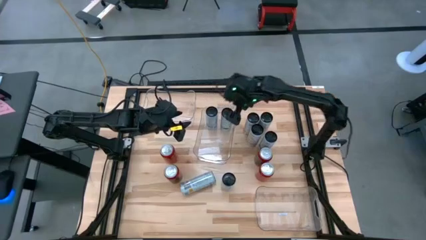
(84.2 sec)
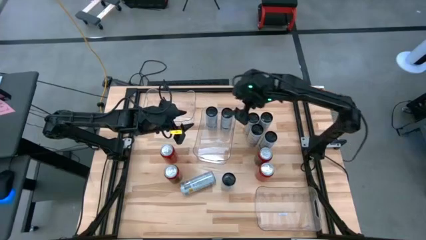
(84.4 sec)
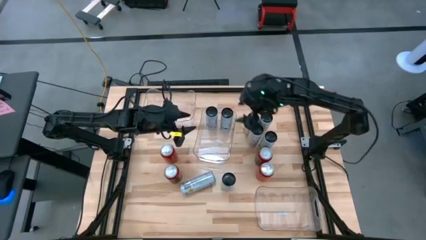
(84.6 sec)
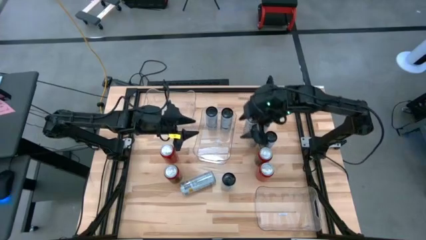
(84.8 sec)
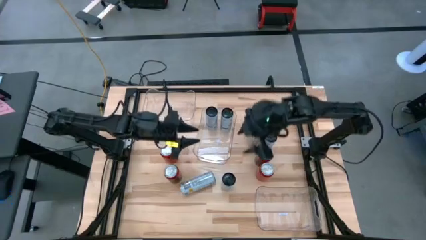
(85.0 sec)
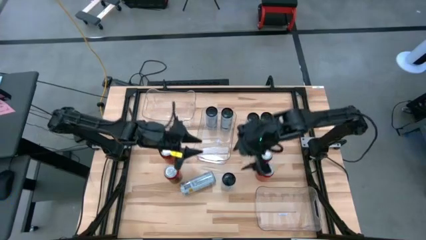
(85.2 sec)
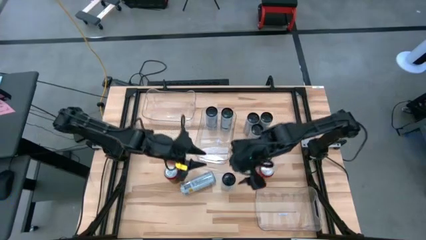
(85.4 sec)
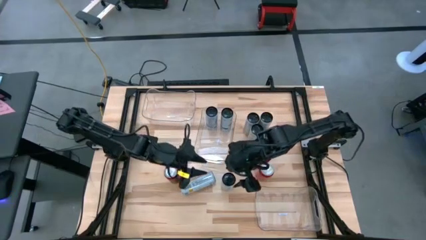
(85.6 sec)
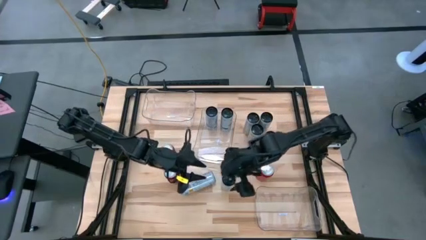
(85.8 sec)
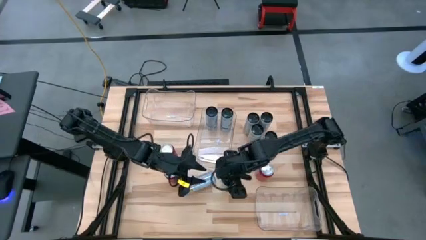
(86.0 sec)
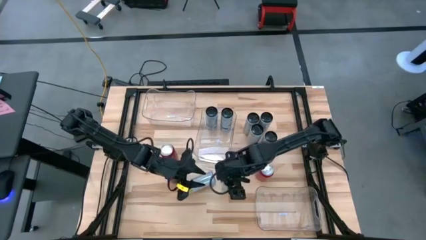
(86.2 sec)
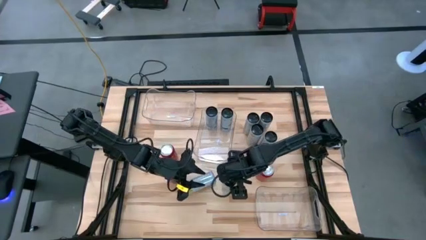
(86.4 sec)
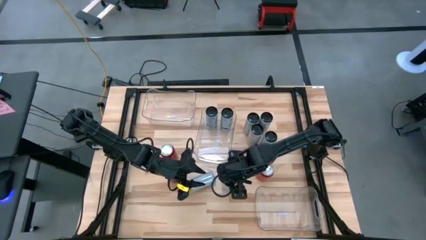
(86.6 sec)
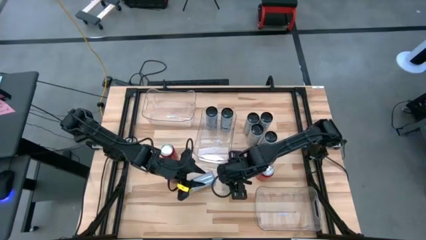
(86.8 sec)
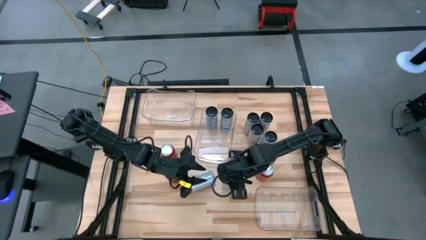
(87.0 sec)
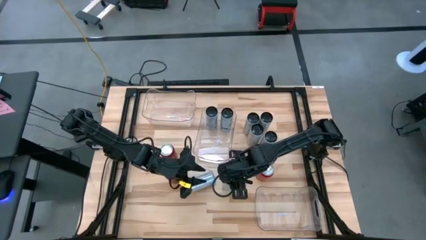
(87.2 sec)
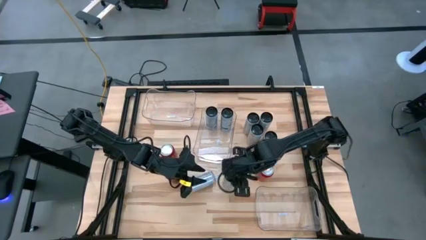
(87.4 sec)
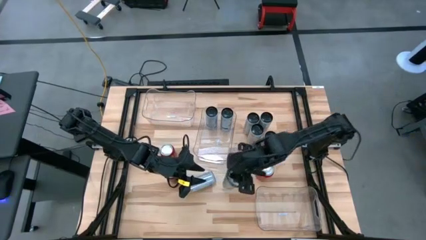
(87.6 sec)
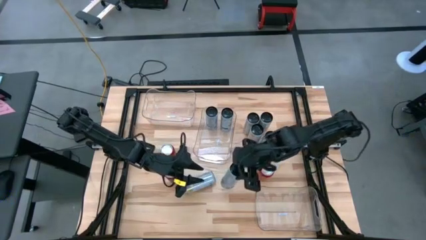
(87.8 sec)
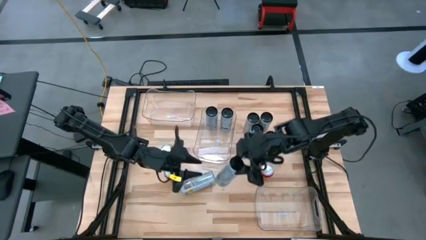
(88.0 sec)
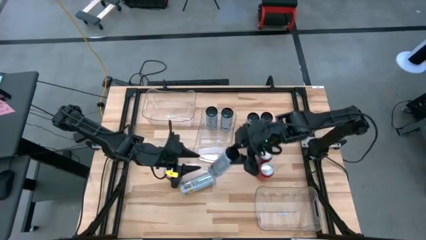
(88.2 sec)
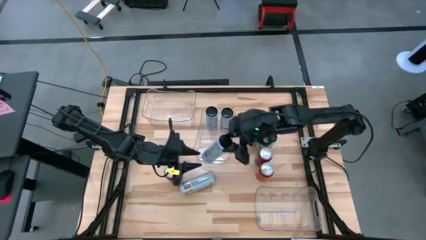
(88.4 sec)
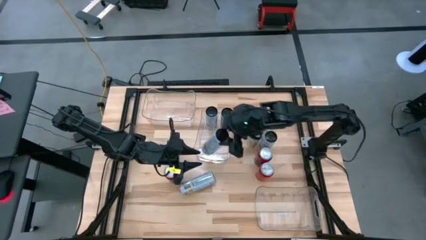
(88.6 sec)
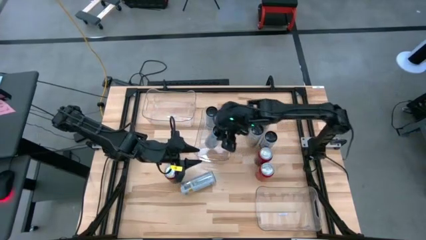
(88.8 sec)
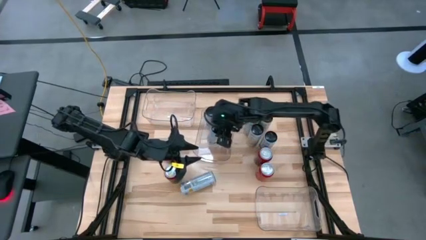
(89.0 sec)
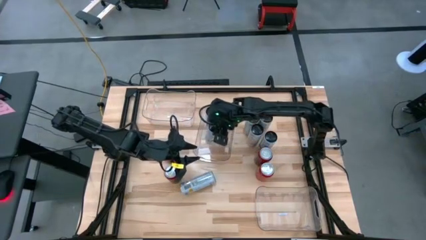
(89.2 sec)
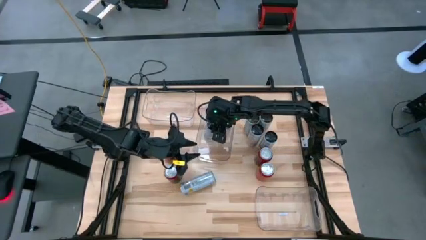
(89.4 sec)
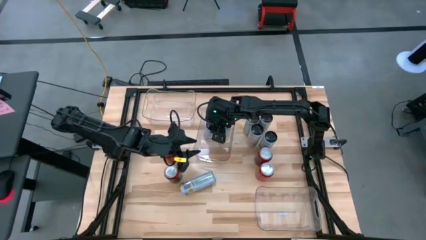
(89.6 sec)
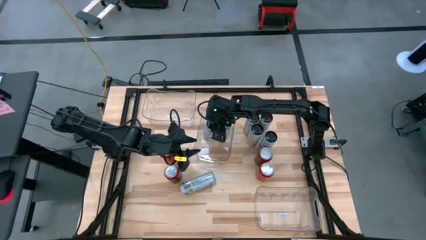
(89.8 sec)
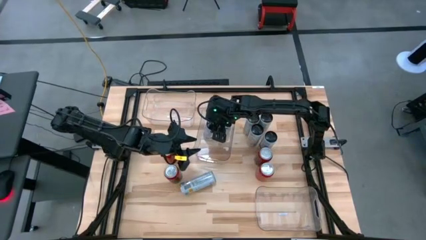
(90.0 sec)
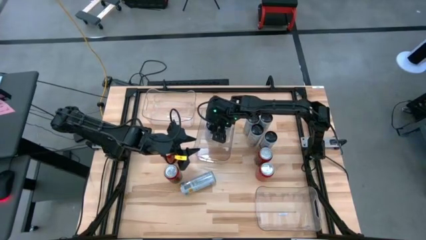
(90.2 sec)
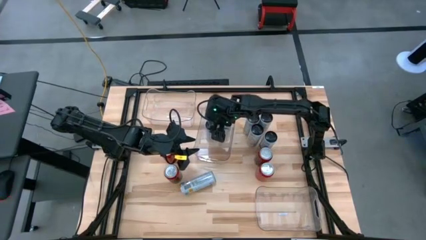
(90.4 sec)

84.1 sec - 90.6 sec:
Task: Sort soda cans
Put the white blue soda can into the middle transparent bin

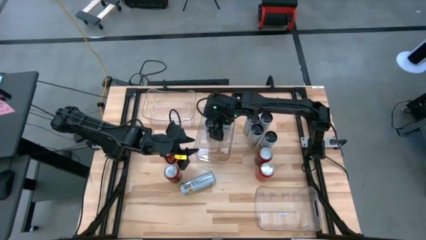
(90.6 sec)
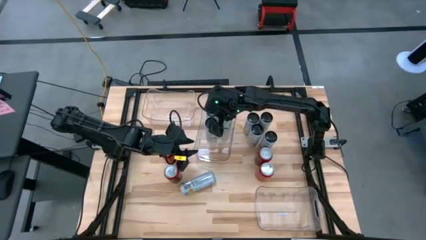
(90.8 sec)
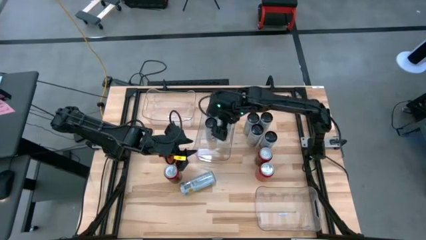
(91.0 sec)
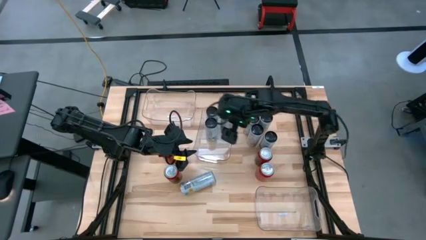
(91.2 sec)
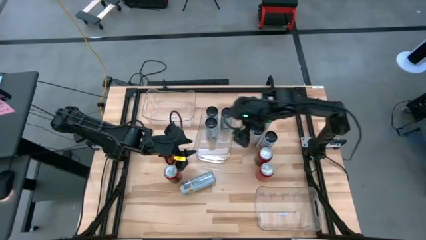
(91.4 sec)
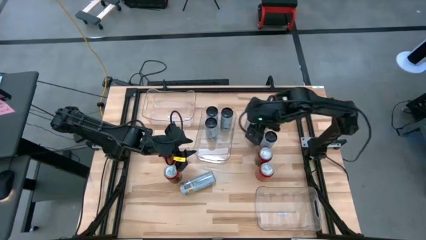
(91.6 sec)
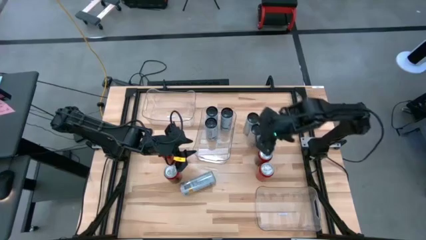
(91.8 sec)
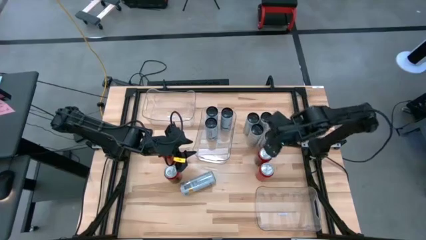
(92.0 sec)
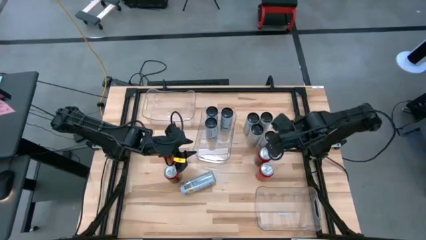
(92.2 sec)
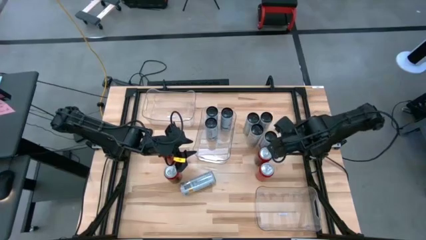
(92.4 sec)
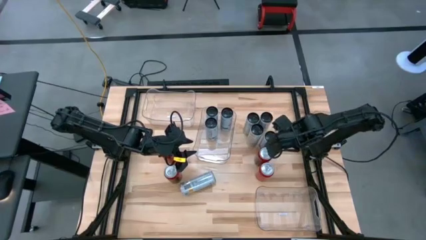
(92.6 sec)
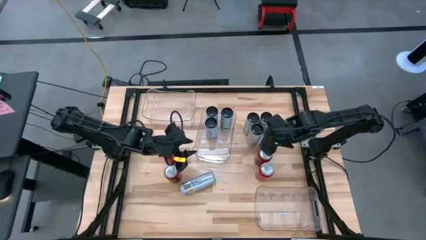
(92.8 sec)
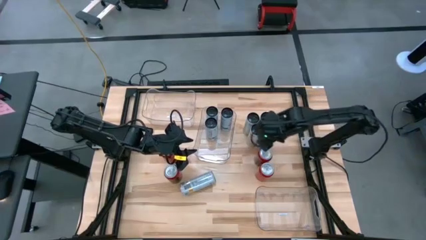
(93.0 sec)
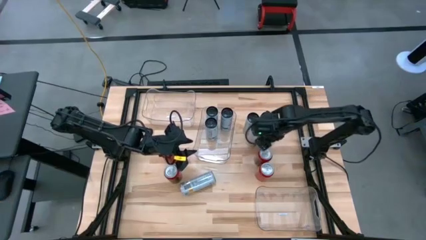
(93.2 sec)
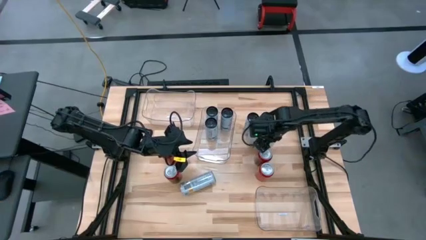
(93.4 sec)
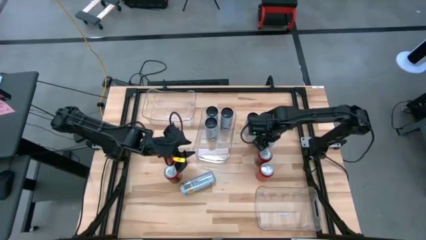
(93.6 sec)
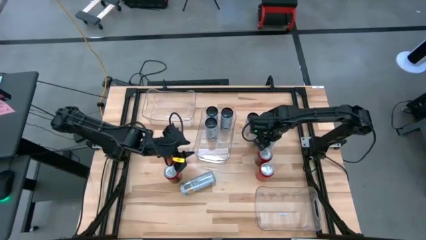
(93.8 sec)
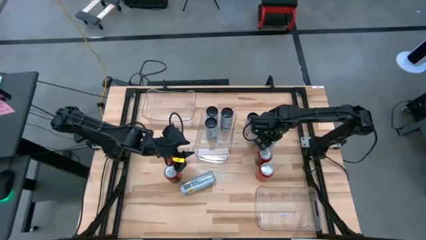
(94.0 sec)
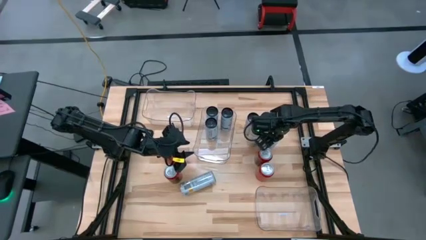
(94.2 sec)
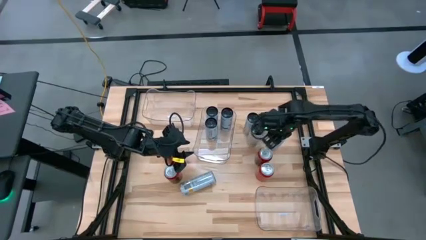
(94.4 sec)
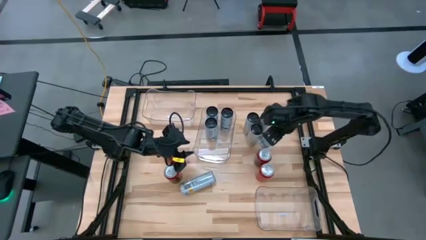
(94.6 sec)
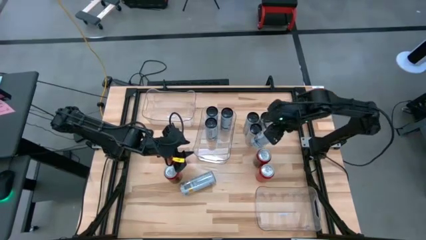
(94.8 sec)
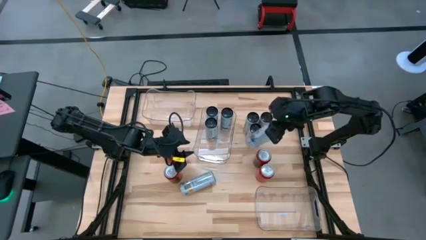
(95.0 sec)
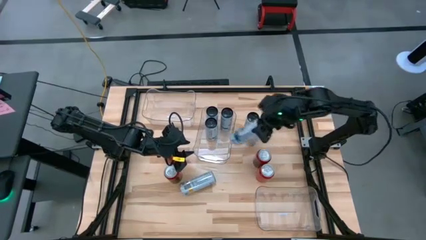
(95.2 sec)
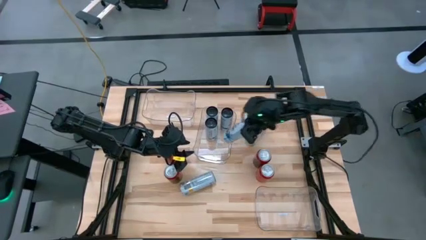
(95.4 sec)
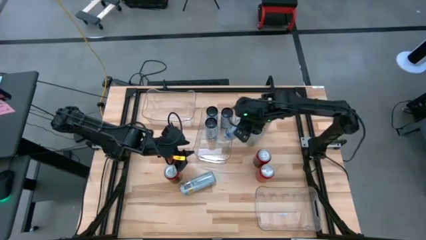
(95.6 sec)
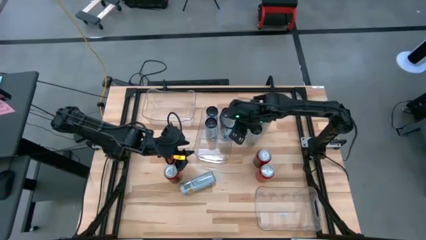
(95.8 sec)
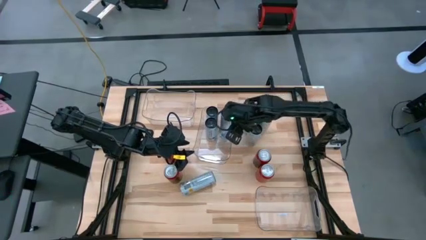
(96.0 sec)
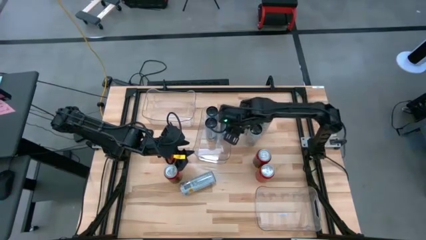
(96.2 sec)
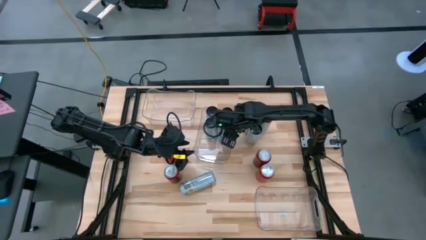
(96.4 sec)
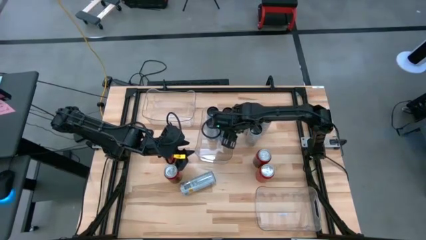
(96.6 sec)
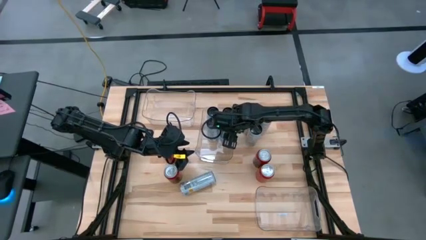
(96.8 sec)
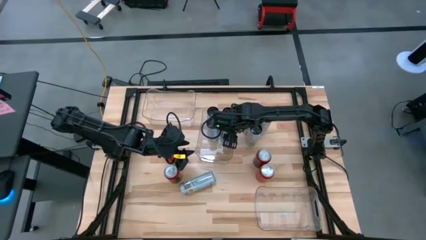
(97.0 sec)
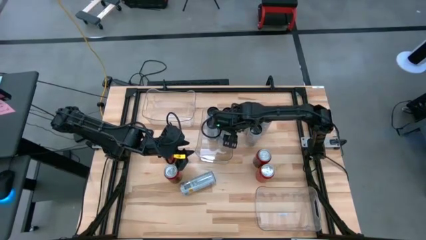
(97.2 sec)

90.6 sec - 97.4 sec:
Put the white blue soda can into the middle transparent bin
